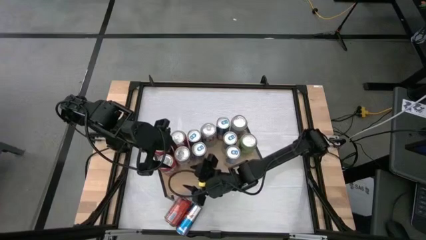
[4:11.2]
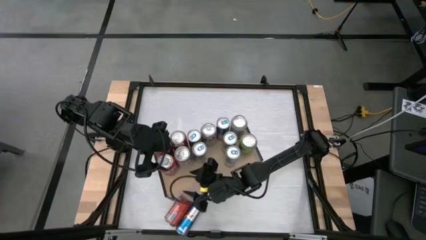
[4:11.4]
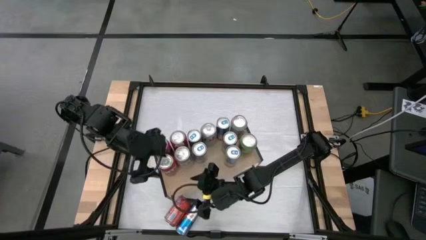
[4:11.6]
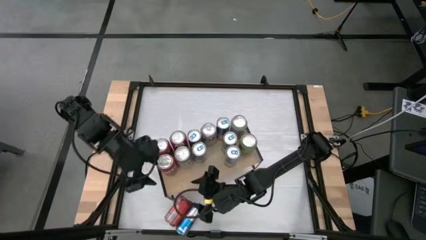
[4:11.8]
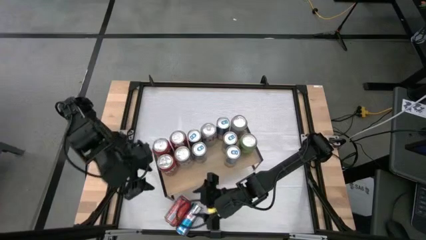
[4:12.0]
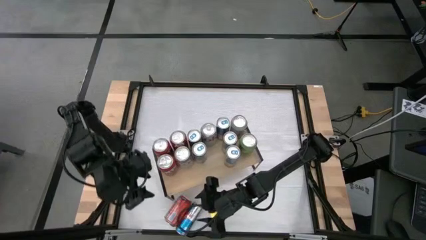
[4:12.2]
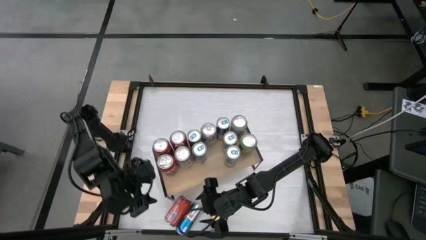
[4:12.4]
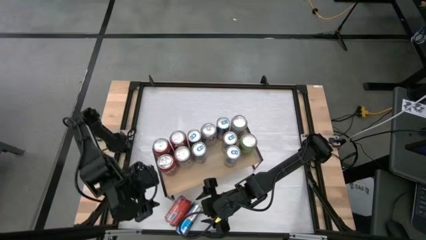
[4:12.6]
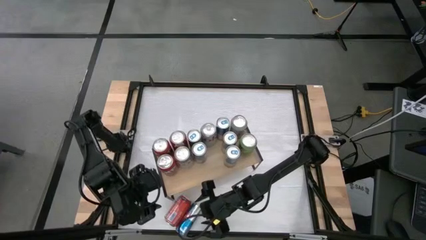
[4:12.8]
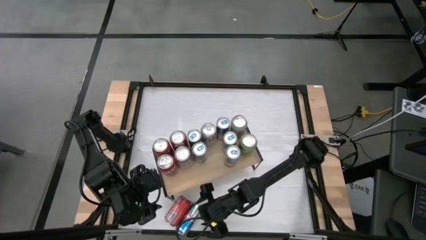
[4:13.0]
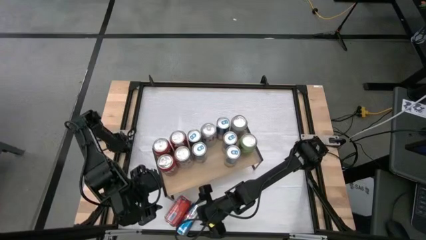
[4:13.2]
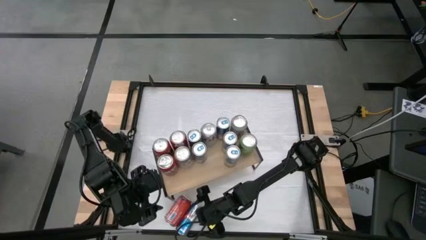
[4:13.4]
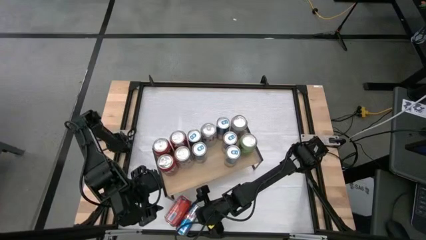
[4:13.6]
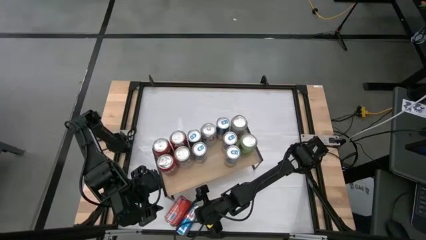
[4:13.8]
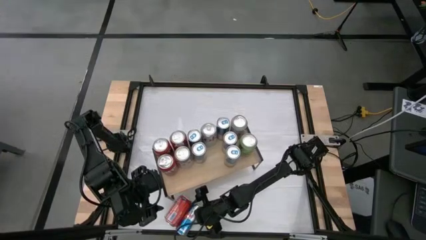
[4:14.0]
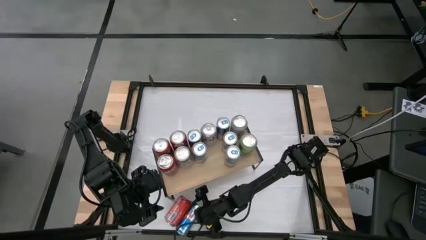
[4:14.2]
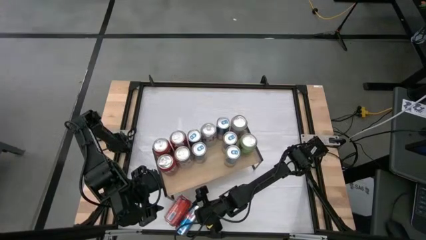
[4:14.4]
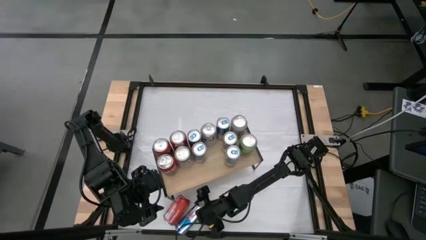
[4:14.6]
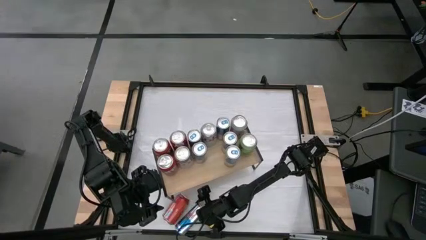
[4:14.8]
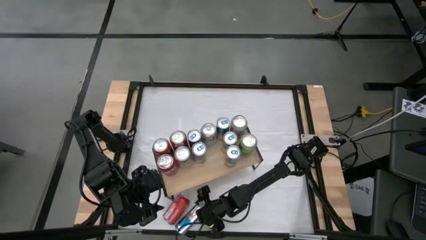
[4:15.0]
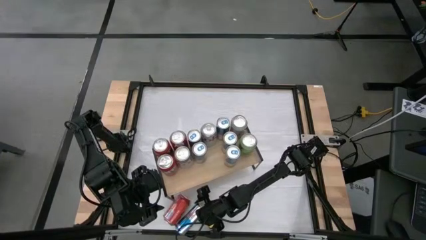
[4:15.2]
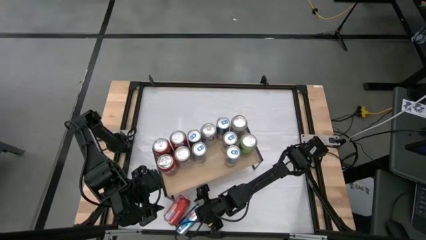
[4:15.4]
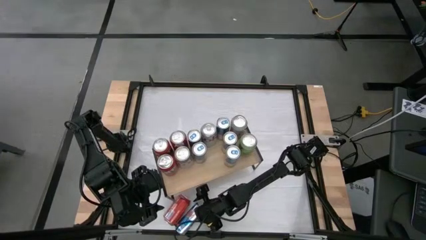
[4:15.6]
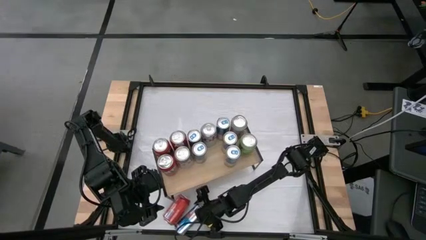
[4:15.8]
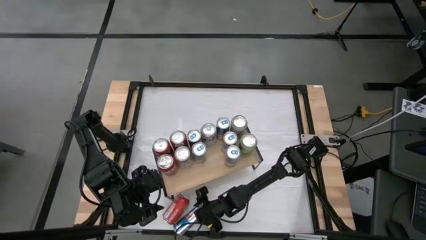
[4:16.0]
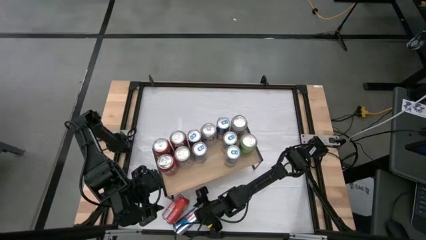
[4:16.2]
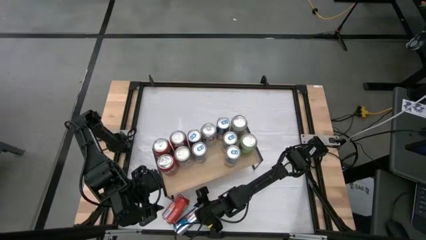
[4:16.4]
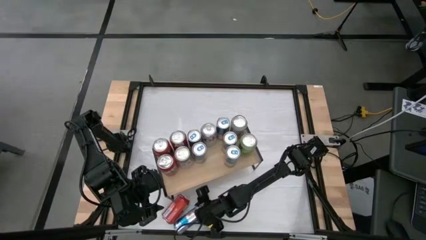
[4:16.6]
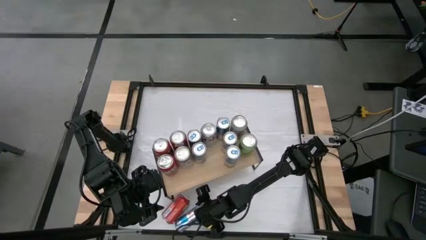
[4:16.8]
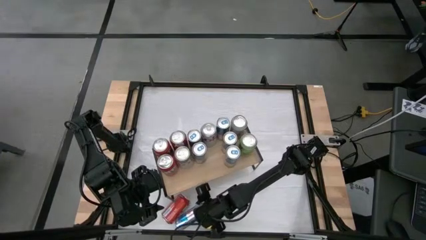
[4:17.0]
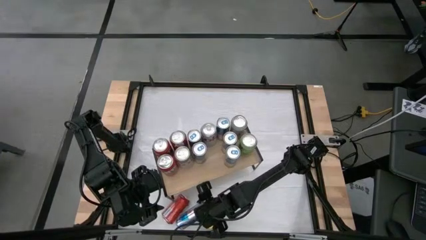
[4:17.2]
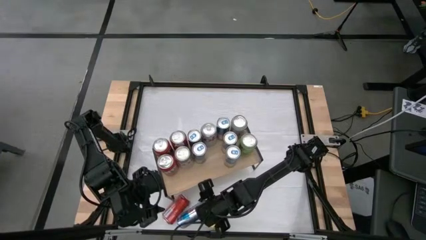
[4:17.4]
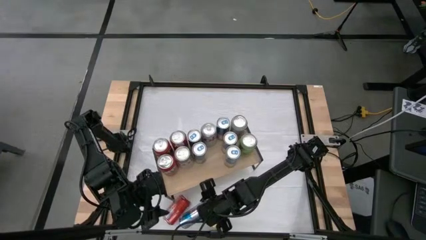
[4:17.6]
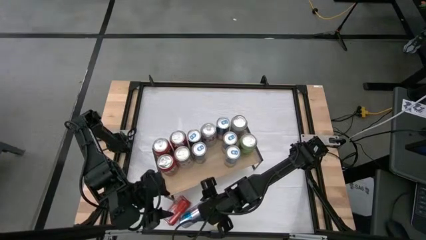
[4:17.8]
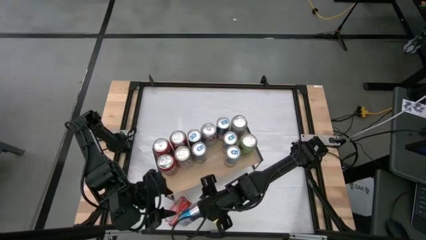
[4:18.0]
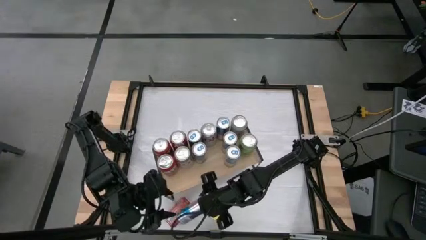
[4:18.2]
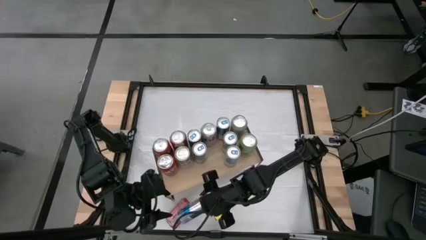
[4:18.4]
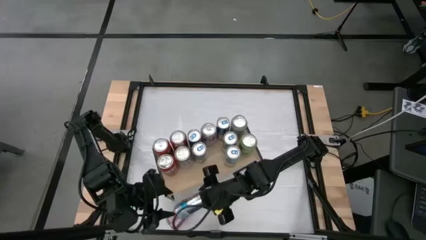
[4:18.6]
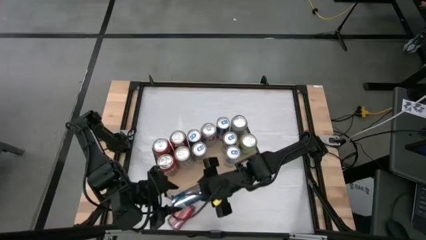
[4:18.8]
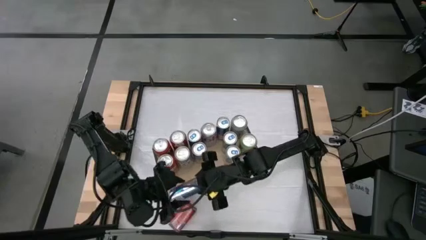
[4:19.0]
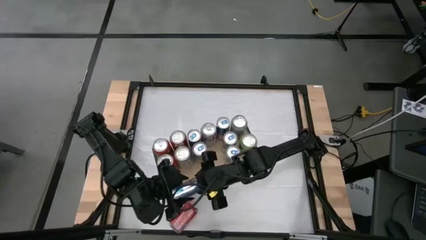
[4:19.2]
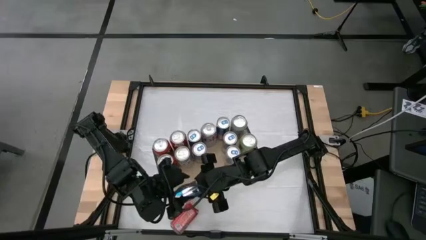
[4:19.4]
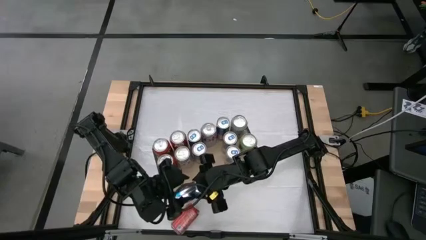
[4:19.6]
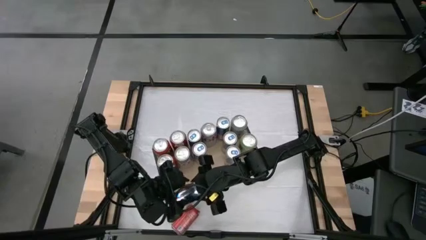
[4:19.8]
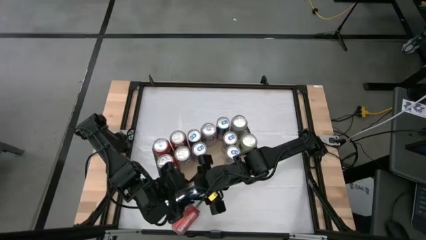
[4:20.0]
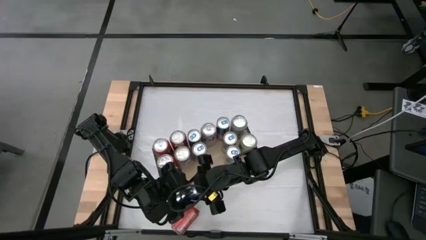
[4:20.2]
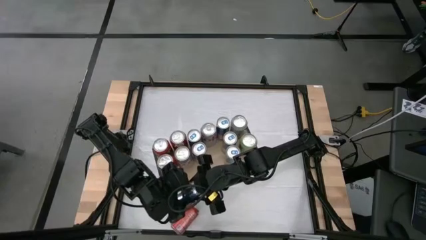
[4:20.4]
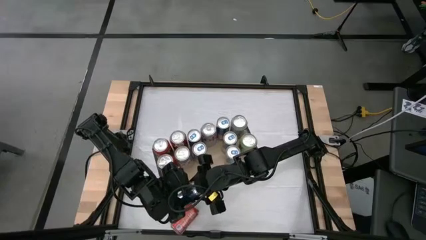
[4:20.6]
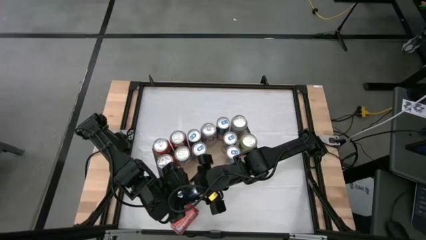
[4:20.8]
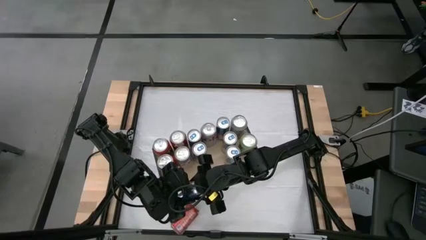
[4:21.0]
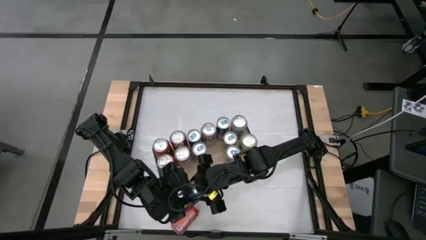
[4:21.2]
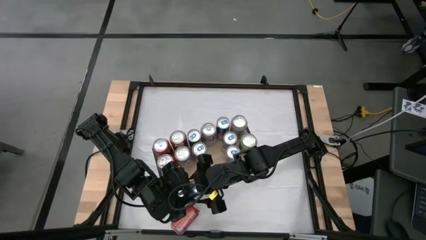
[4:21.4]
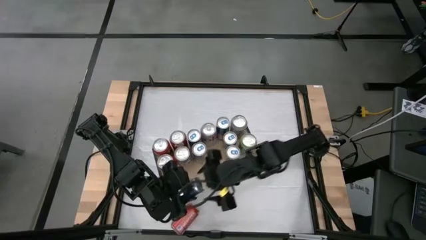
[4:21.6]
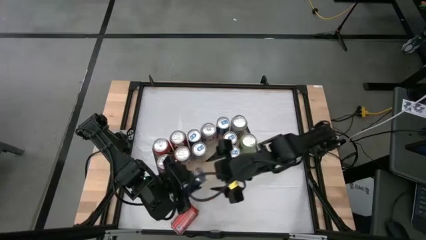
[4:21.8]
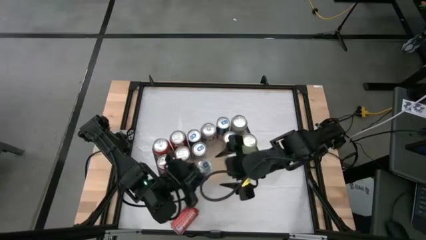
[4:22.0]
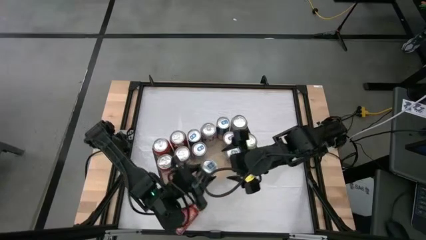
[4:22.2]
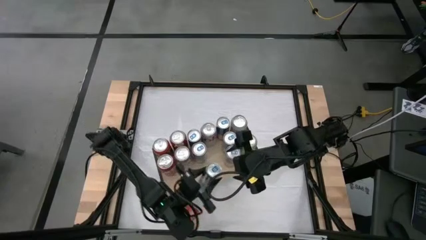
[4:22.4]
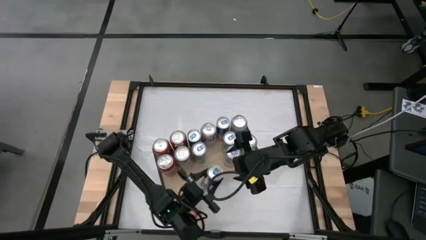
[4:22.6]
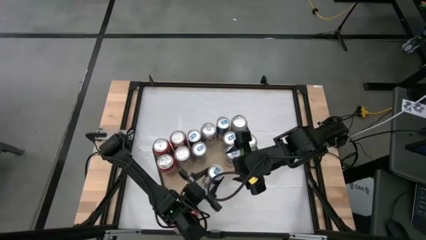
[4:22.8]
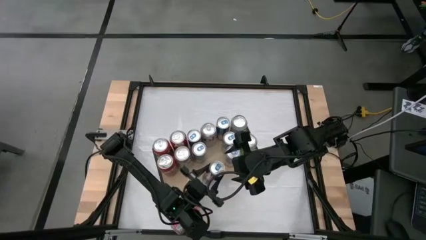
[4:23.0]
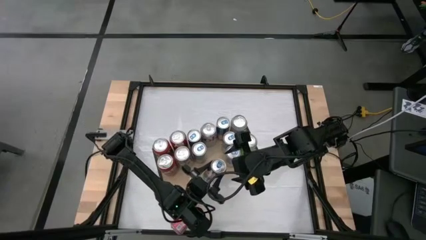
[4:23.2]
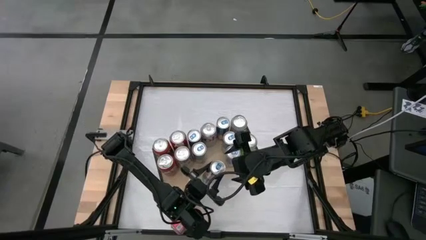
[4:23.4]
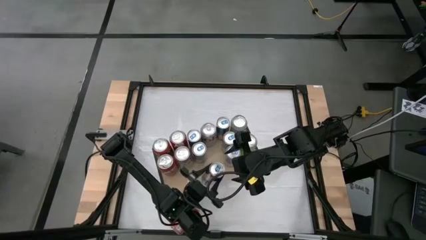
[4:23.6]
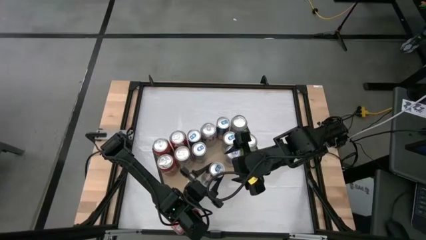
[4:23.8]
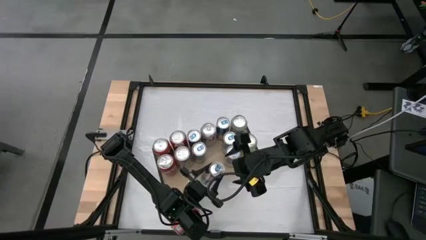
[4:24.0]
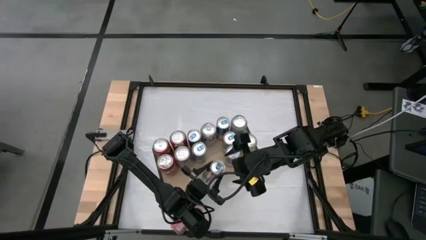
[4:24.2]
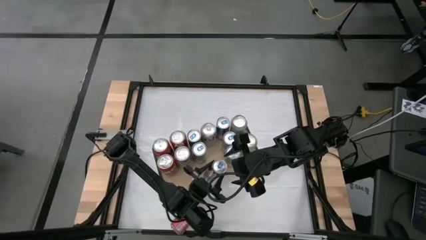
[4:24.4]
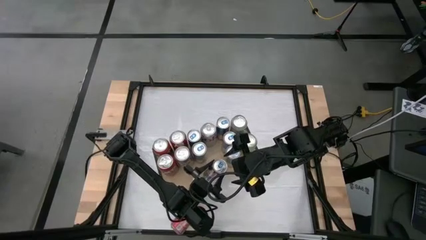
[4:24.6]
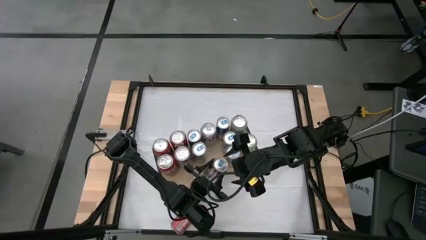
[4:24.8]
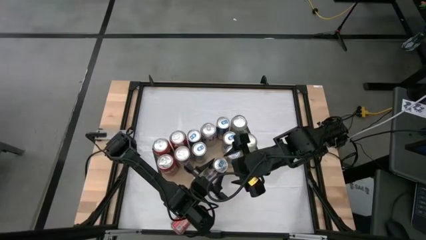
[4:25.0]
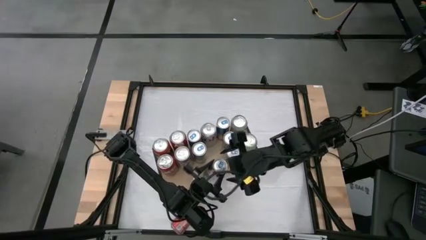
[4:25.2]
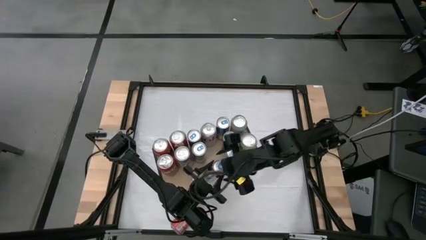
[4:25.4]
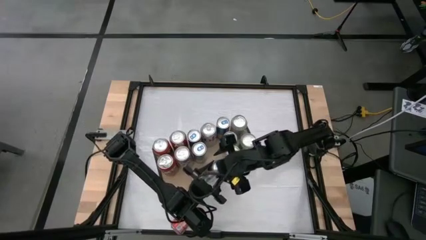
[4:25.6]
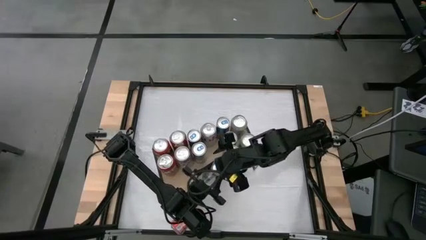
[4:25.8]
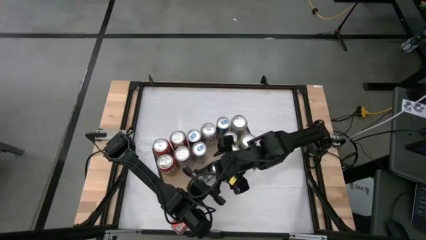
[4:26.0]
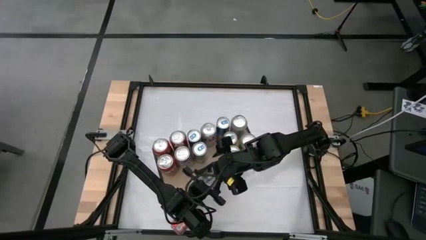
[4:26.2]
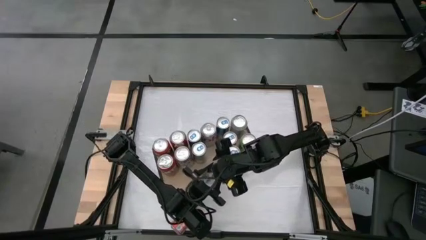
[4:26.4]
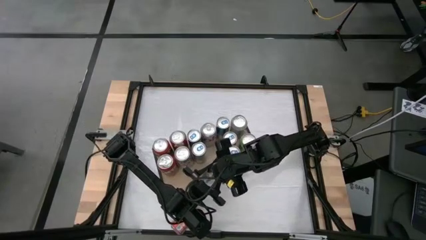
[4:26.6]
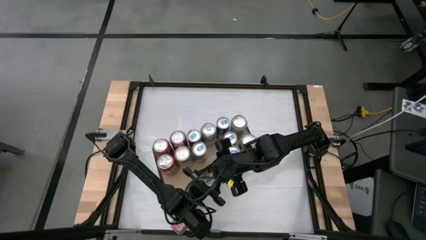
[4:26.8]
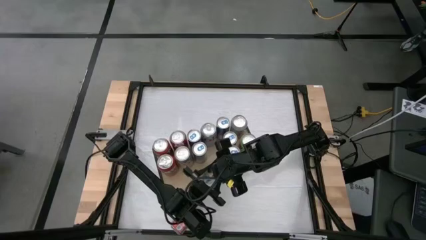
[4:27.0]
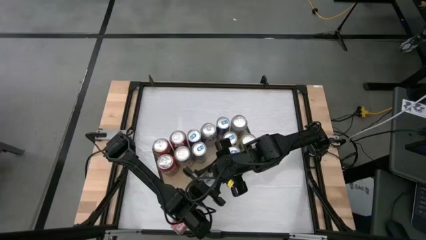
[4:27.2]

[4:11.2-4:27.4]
Task: Place canned beverage on shelf
Put the blue soda can on the shelf aligned with the other blue soda can

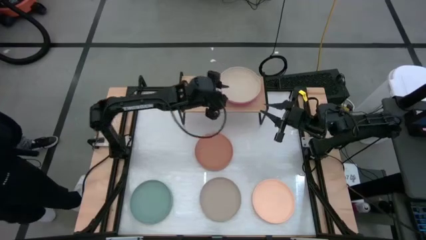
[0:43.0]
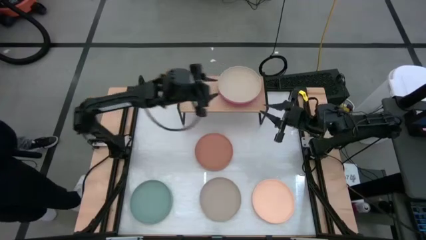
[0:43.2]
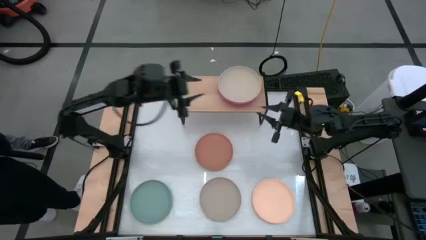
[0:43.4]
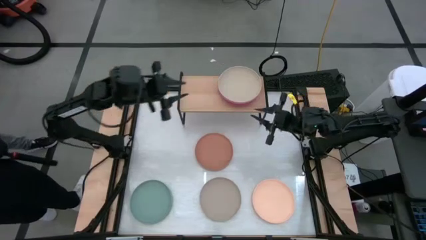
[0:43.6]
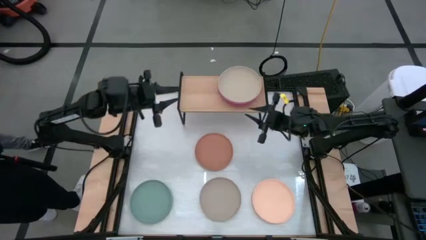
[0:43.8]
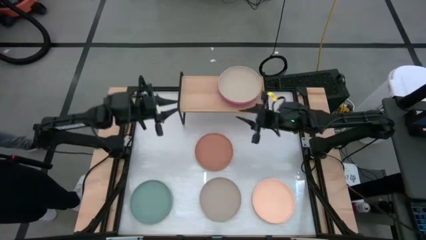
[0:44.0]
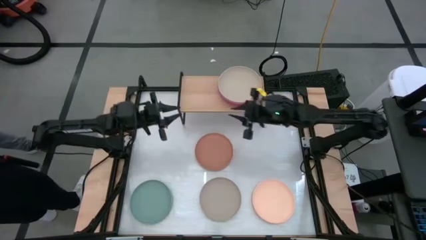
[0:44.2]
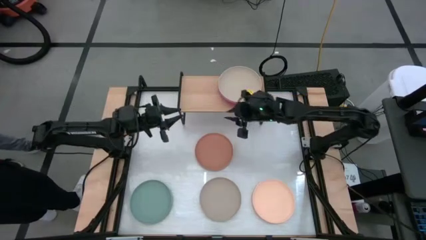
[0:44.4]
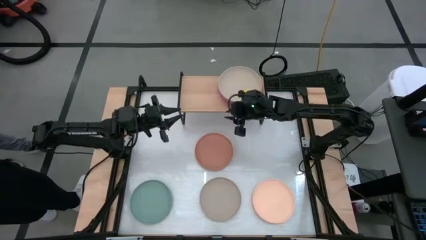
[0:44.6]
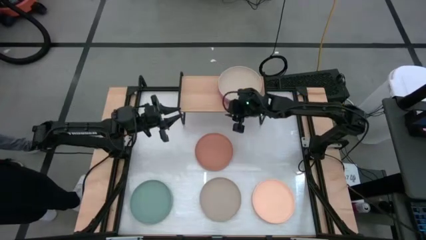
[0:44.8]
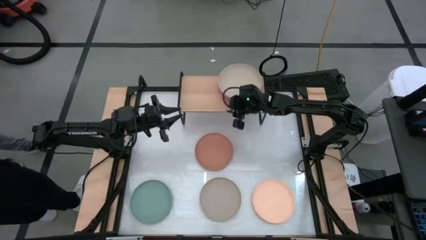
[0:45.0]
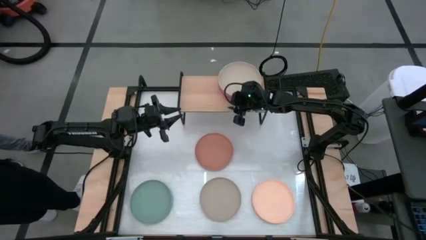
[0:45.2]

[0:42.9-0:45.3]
Task: Place and stack plates onto a shelf
Adjust the stacked bowls on the shelf
